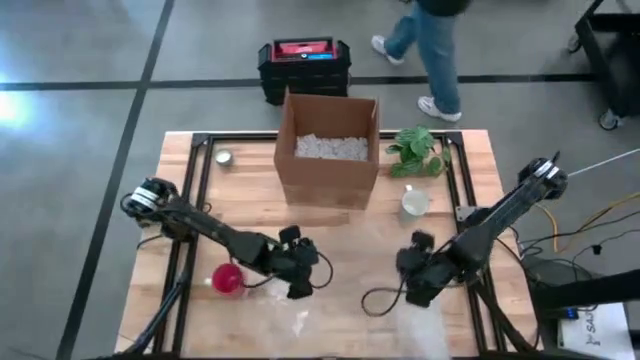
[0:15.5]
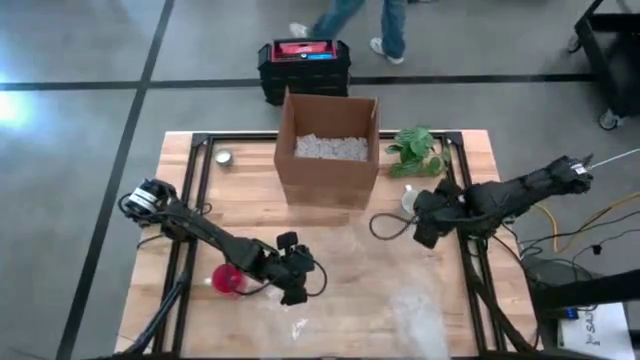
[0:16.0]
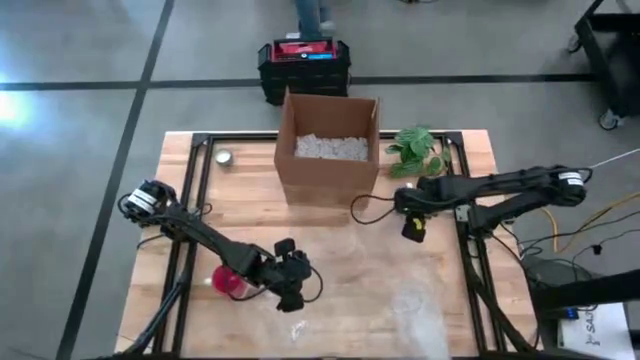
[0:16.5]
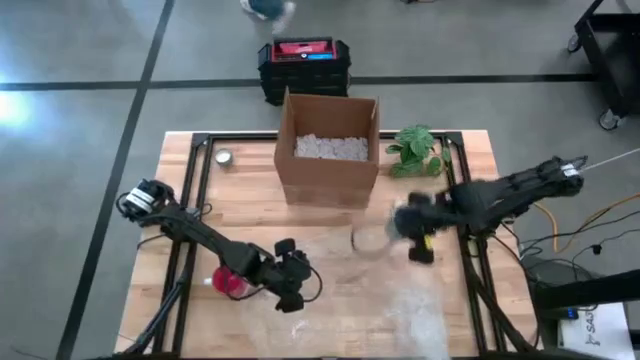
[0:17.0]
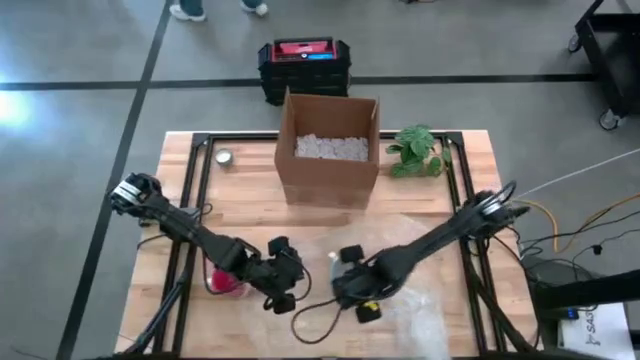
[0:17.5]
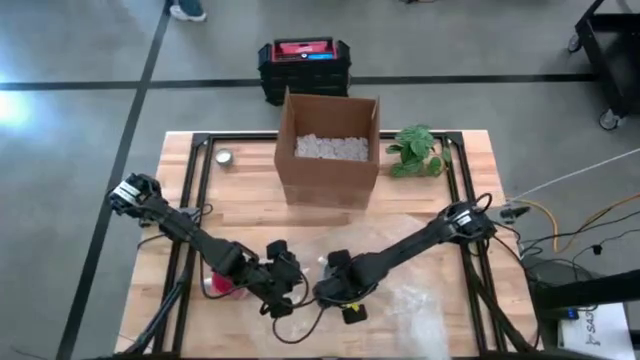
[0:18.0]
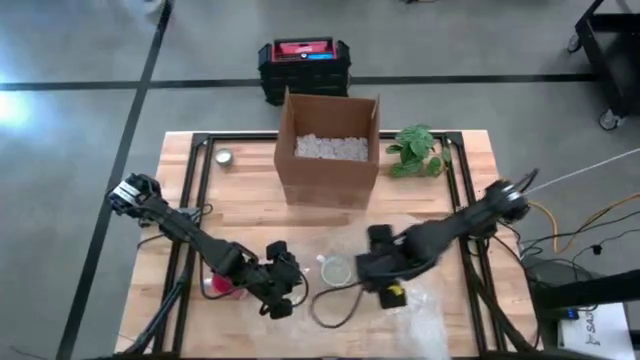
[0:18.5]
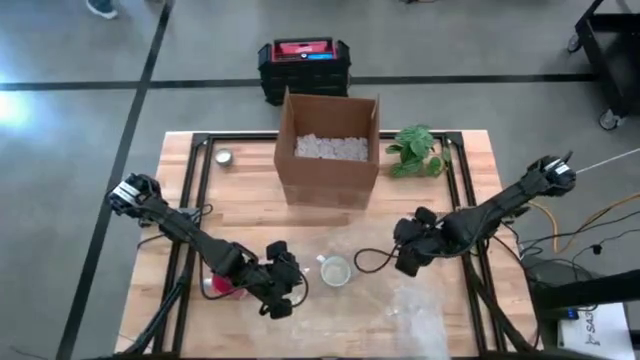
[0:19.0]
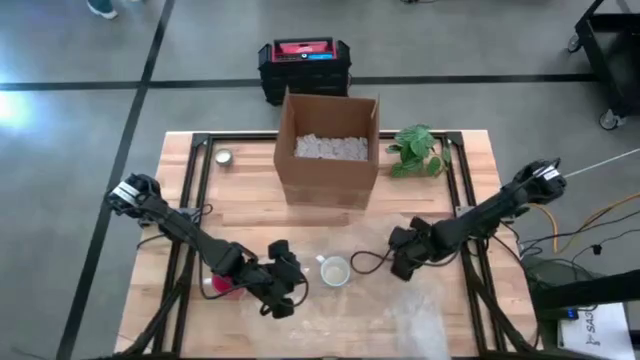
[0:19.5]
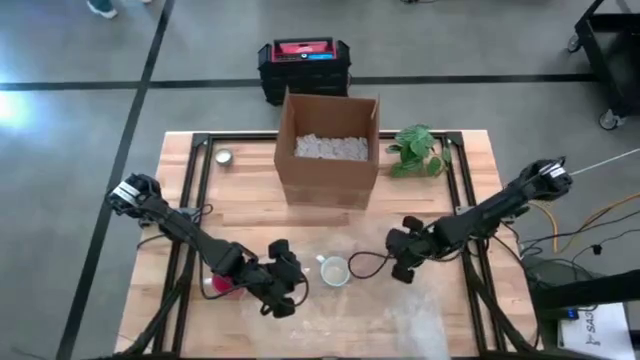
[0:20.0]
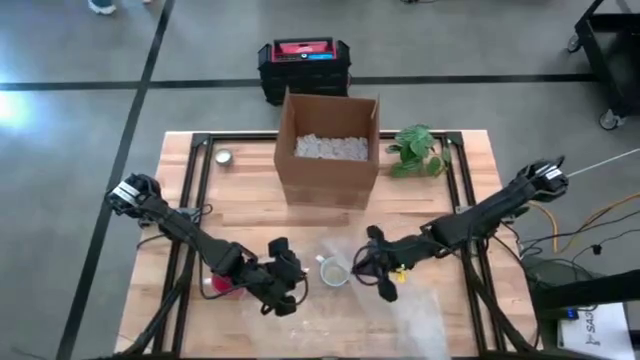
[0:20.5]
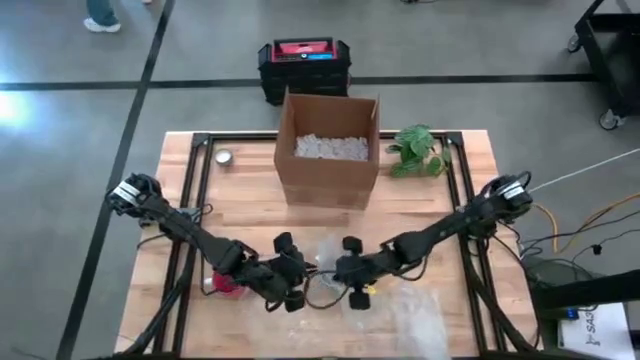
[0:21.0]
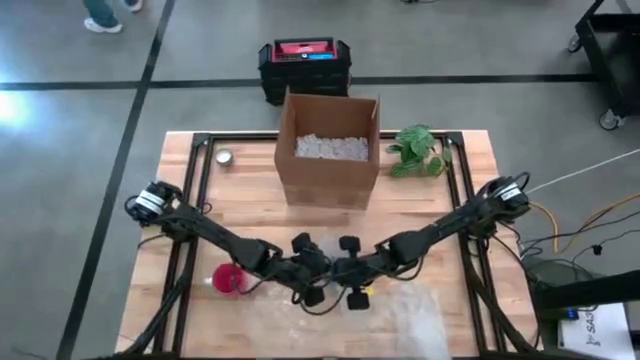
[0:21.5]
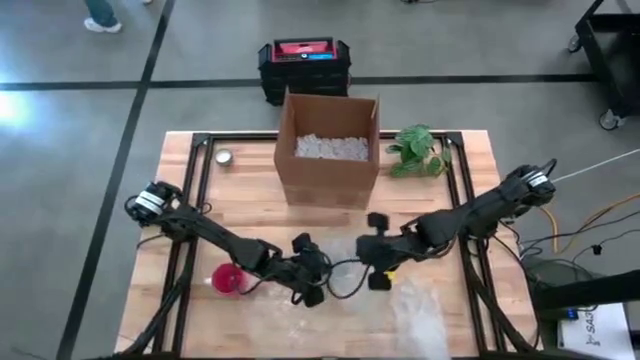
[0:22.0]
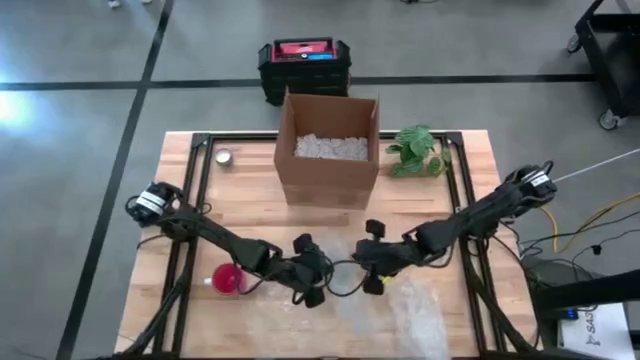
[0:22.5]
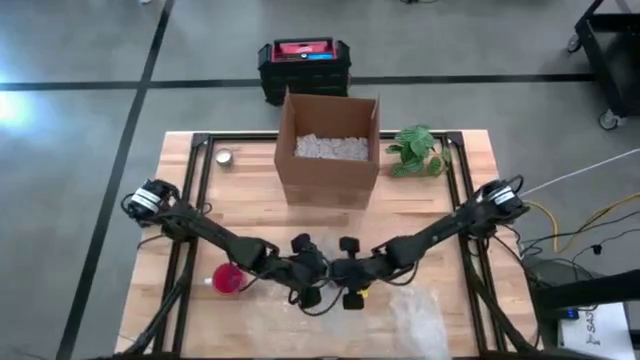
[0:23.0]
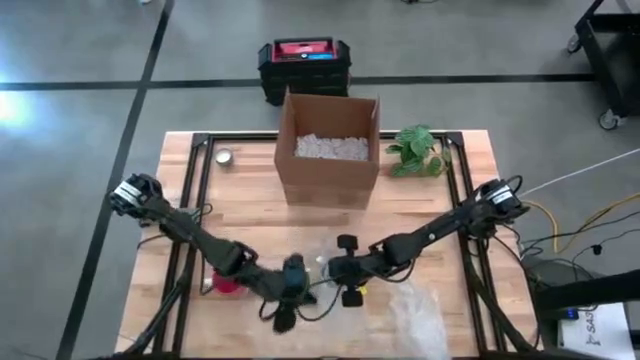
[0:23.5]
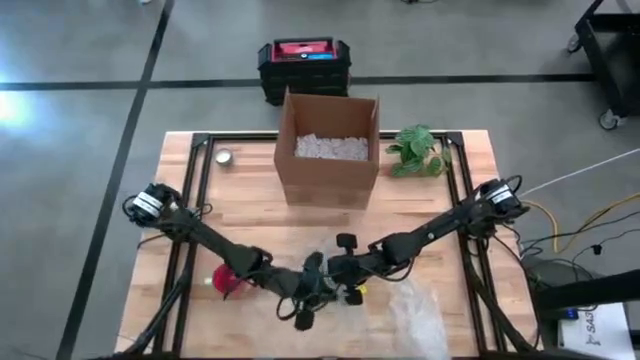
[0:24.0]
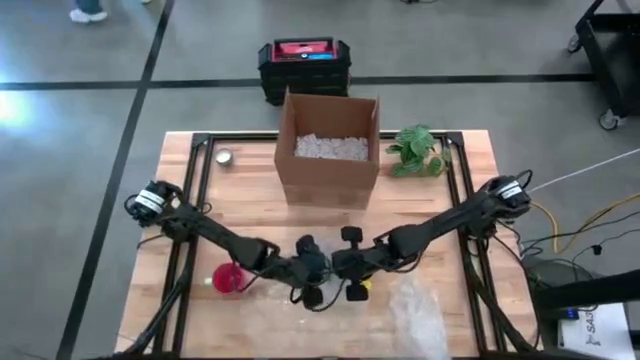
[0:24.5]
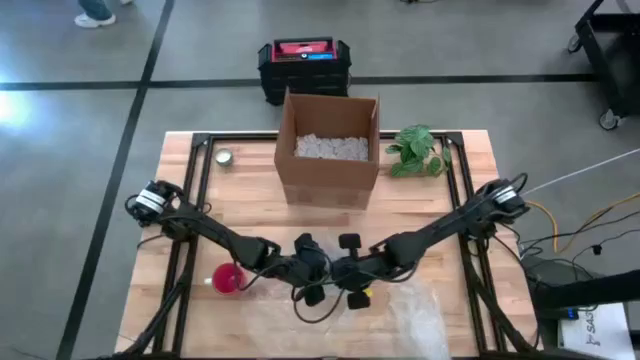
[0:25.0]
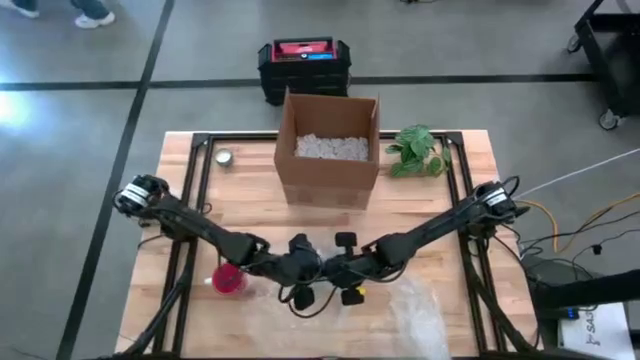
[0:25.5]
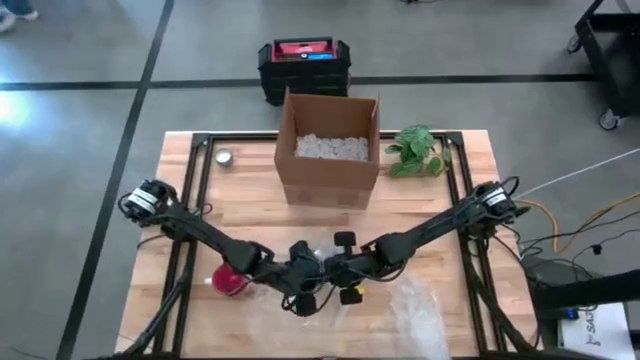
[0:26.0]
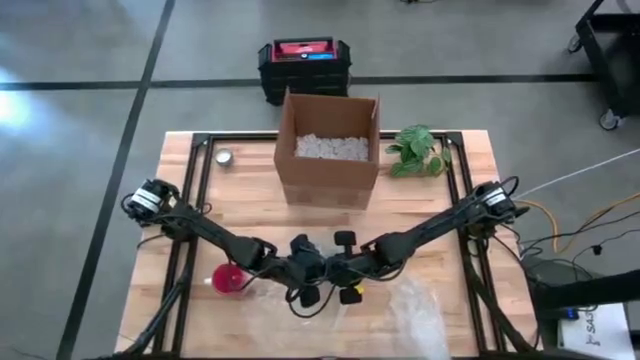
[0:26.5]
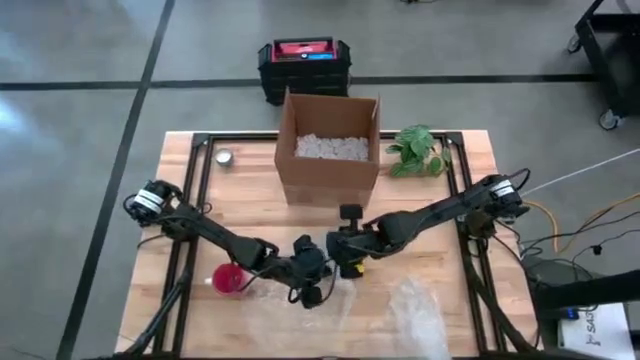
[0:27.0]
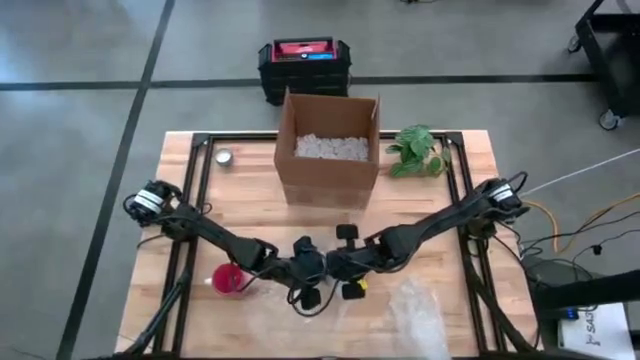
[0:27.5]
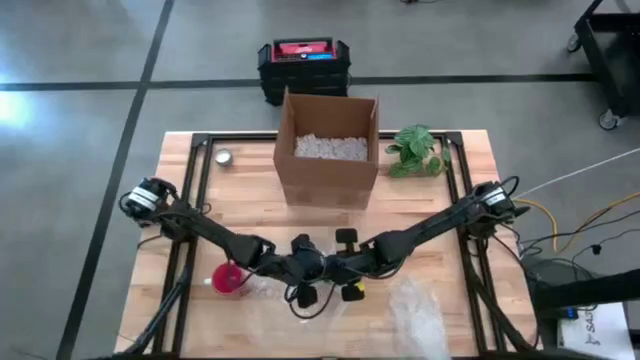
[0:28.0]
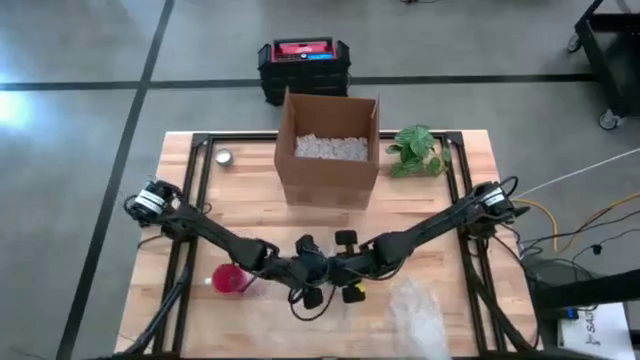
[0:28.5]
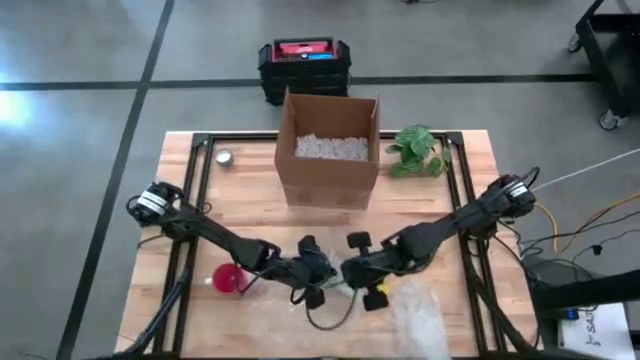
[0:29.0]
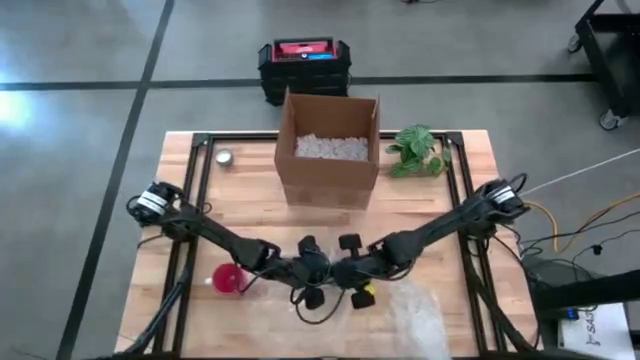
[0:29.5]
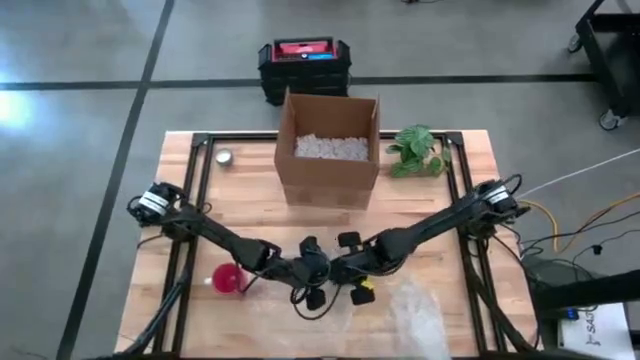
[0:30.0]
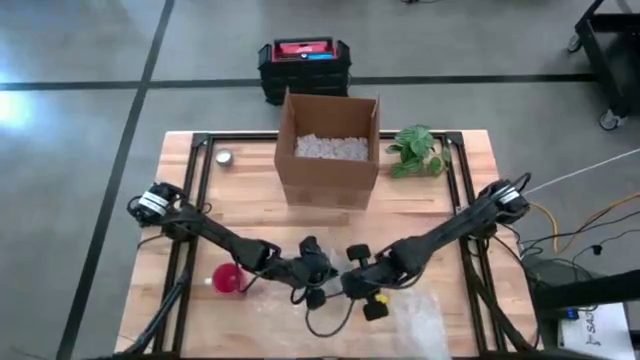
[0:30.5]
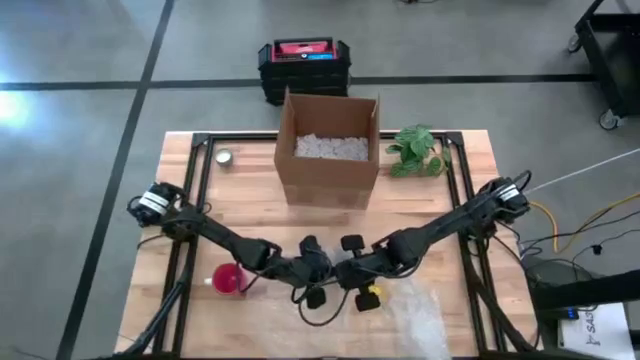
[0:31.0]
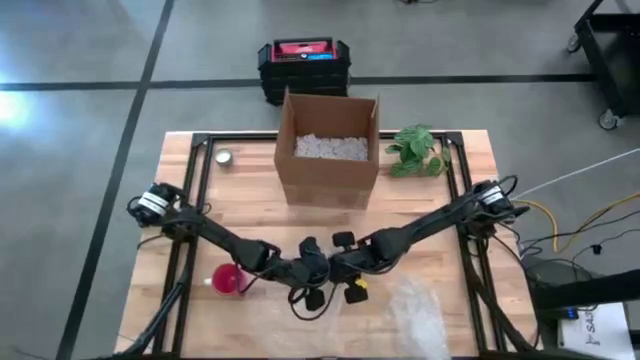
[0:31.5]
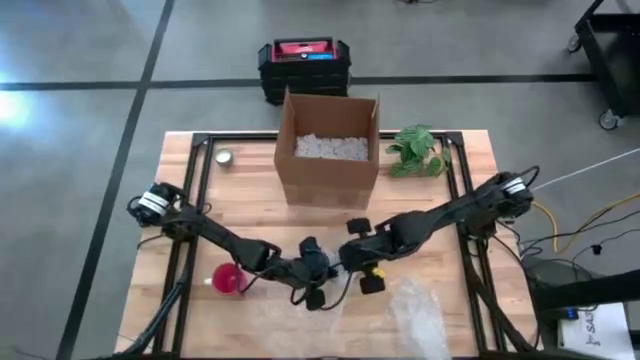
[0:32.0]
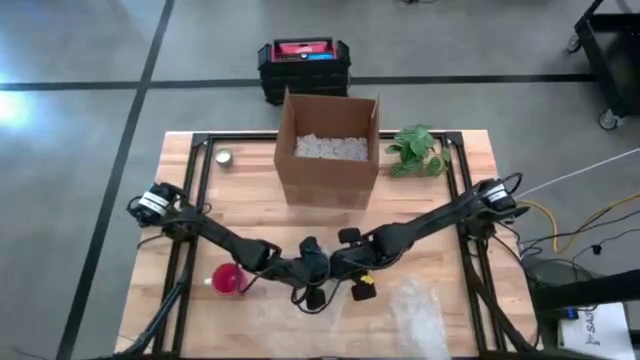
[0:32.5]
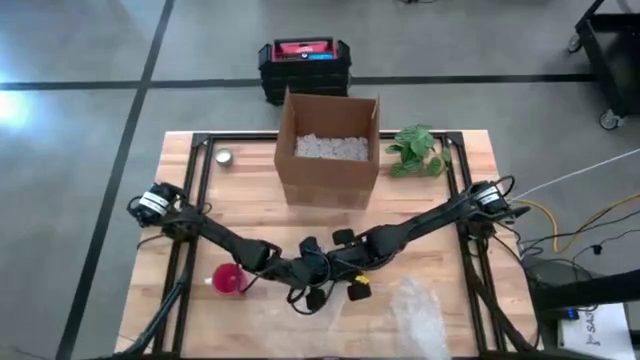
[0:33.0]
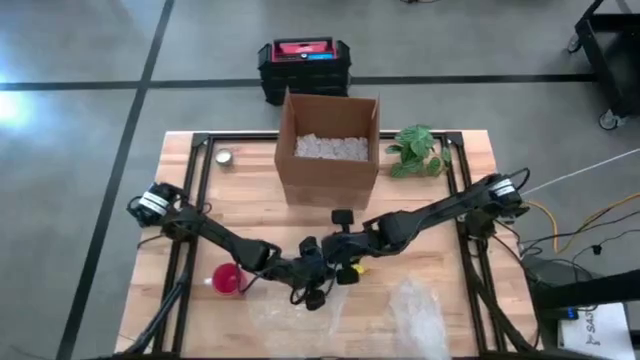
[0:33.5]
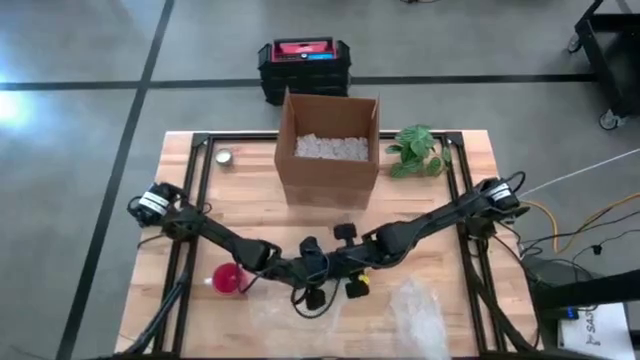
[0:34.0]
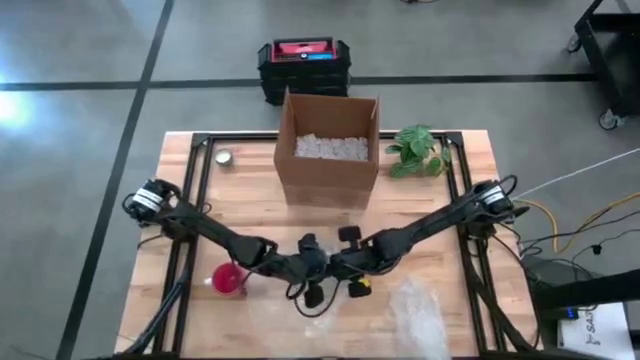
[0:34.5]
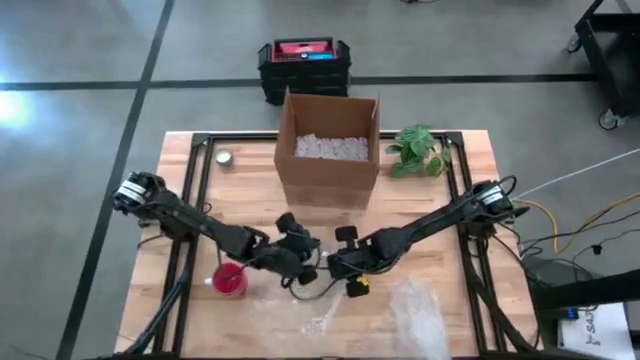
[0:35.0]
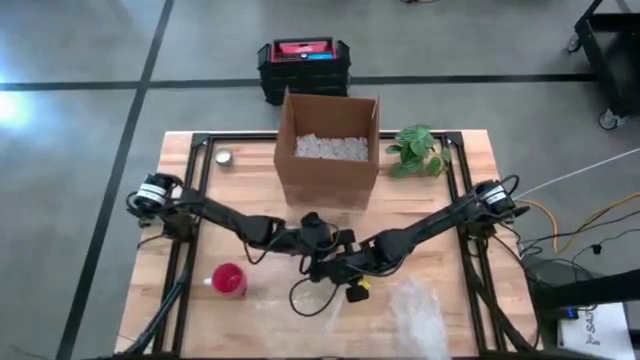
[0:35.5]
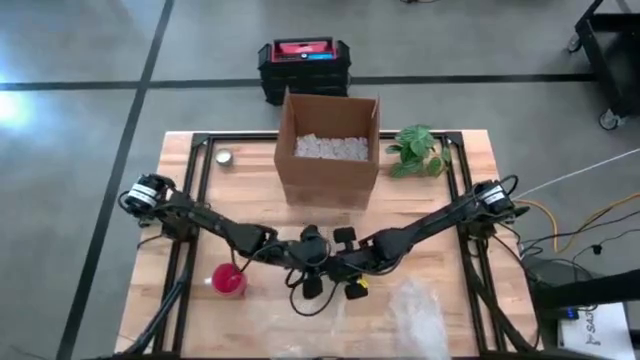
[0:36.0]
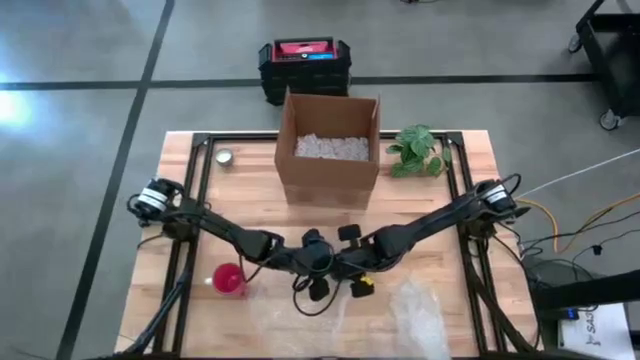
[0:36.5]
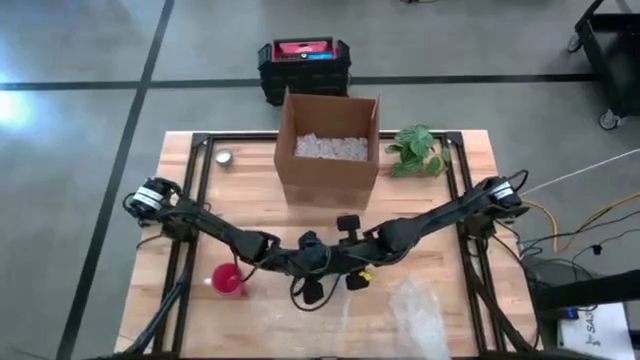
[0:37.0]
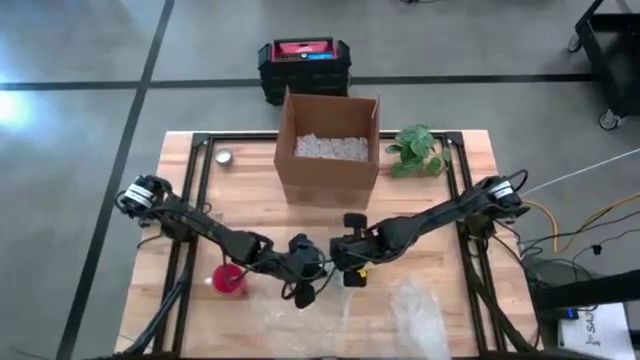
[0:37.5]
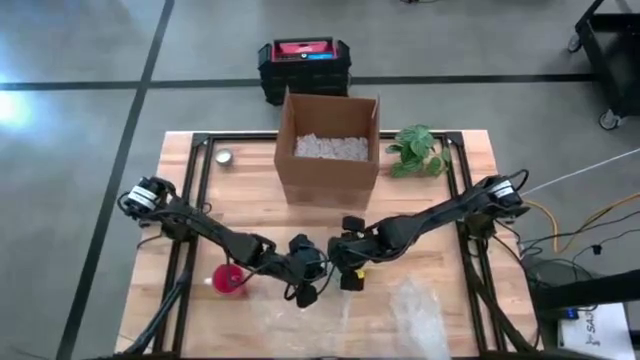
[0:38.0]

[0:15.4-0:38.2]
Task: wrap mug
Wrap the white mug with bubble wrap
